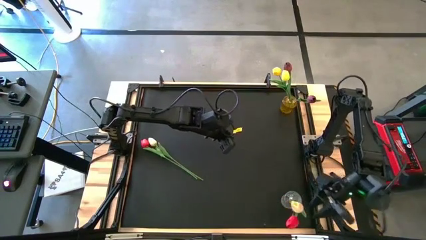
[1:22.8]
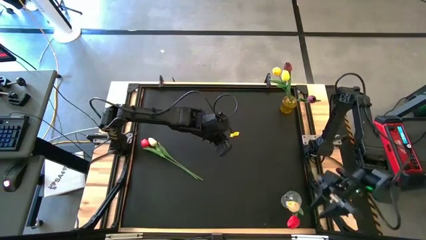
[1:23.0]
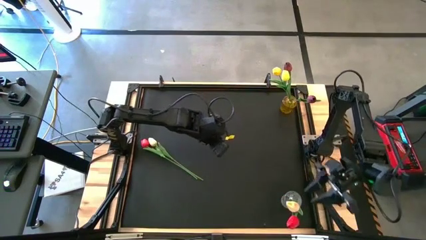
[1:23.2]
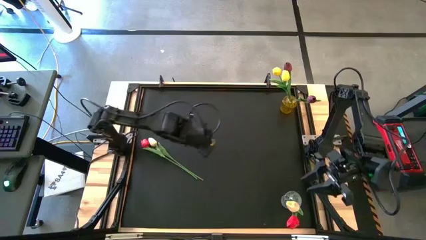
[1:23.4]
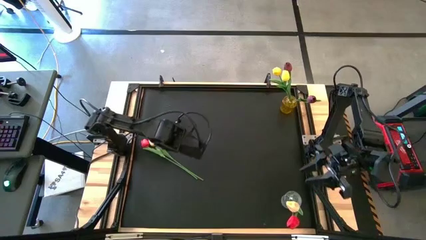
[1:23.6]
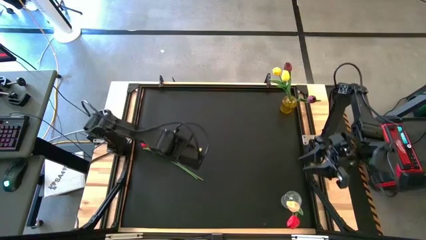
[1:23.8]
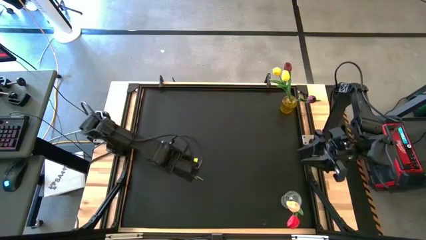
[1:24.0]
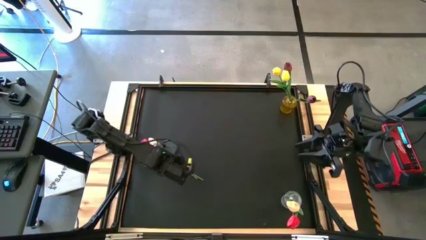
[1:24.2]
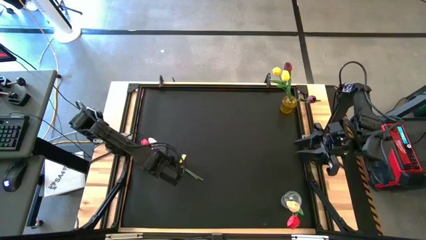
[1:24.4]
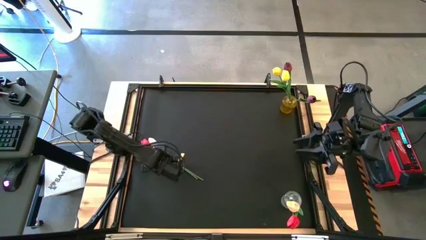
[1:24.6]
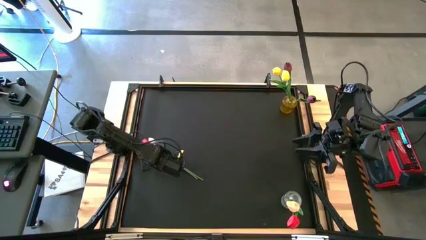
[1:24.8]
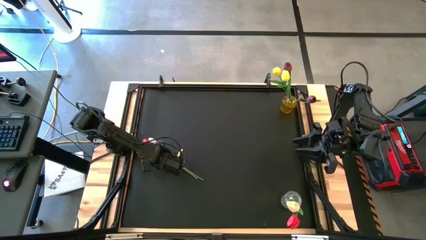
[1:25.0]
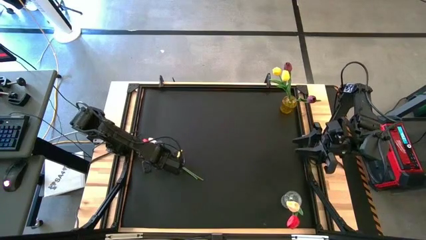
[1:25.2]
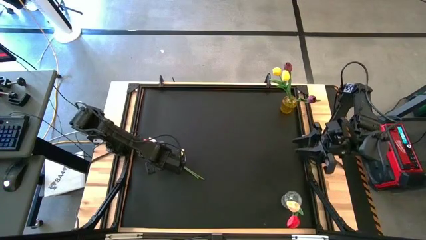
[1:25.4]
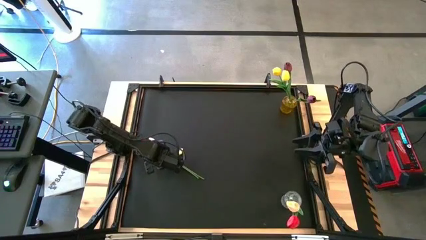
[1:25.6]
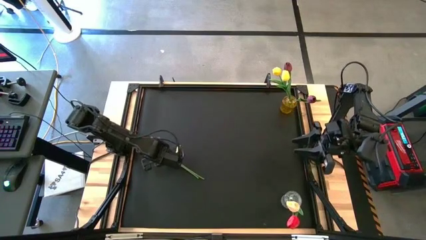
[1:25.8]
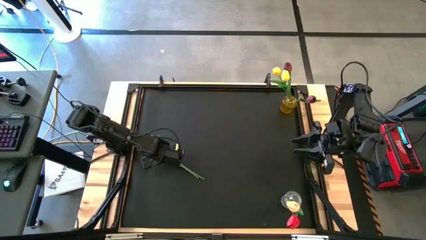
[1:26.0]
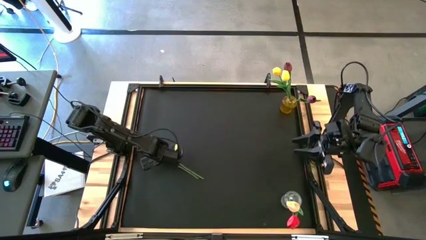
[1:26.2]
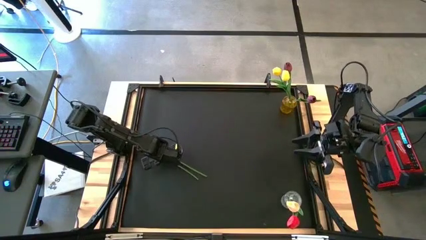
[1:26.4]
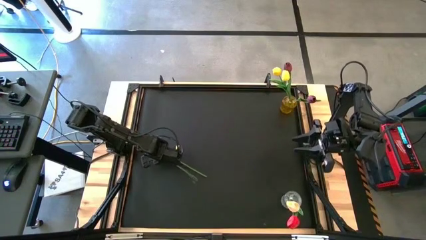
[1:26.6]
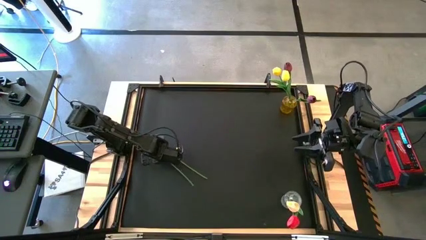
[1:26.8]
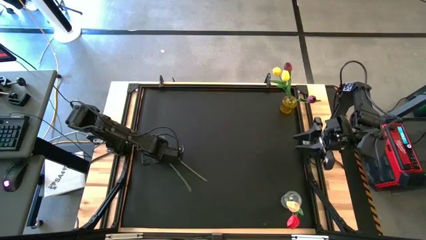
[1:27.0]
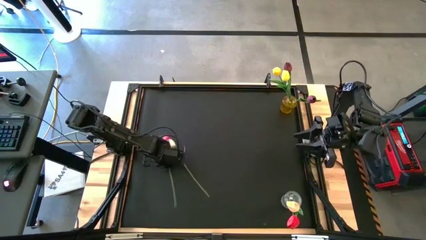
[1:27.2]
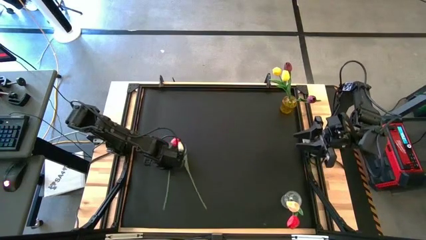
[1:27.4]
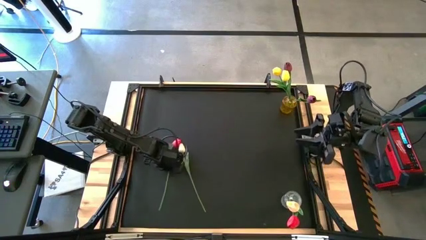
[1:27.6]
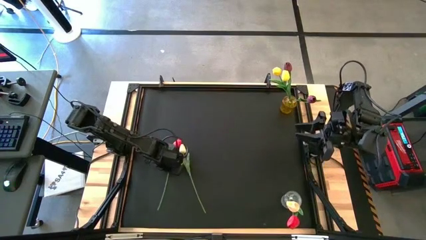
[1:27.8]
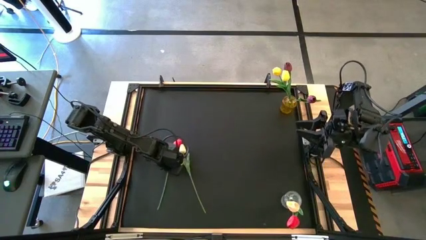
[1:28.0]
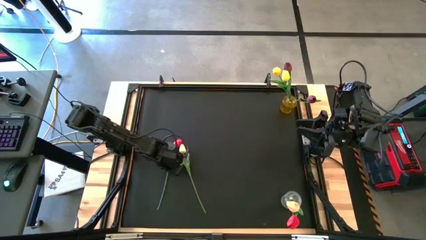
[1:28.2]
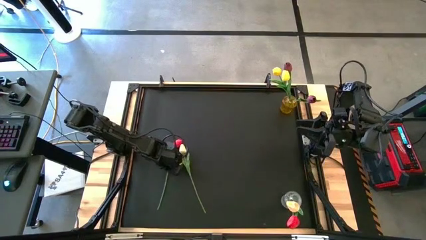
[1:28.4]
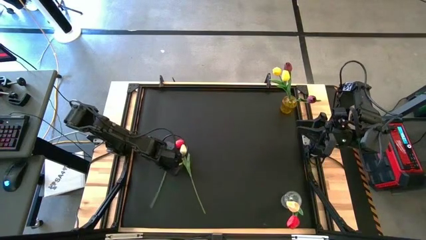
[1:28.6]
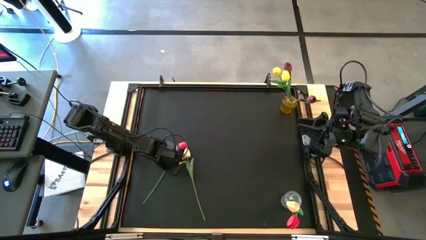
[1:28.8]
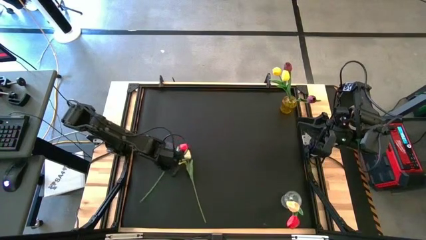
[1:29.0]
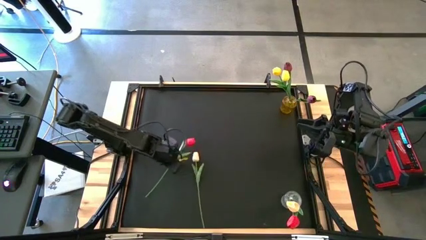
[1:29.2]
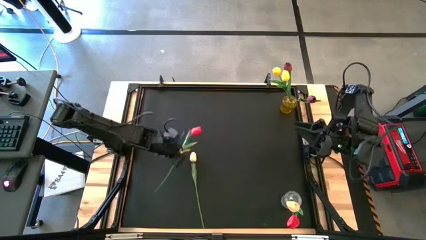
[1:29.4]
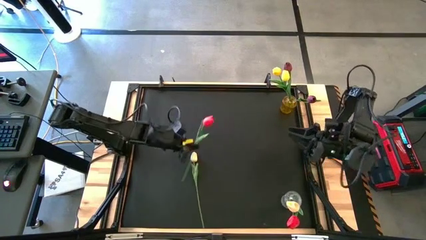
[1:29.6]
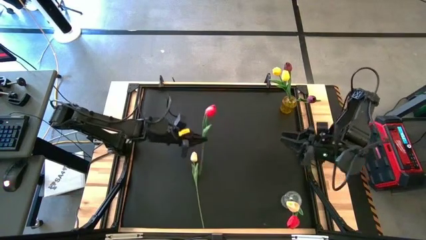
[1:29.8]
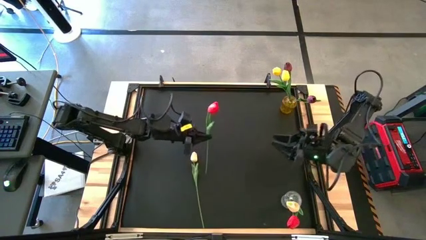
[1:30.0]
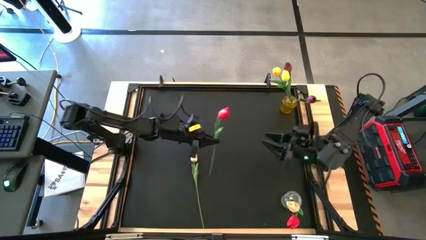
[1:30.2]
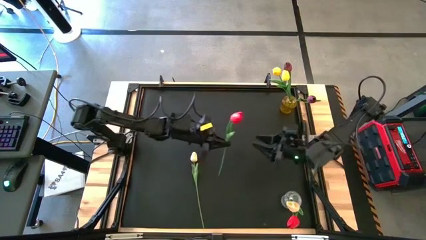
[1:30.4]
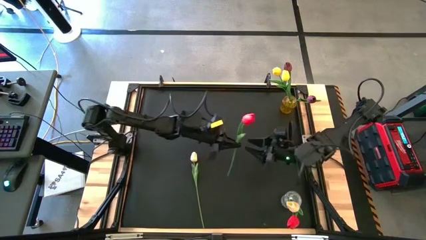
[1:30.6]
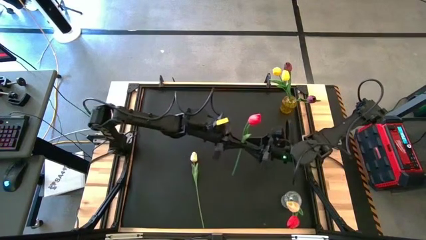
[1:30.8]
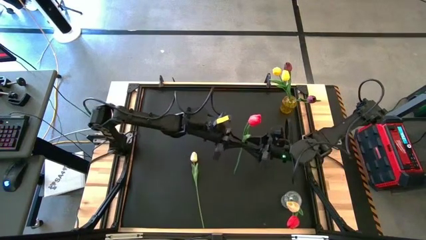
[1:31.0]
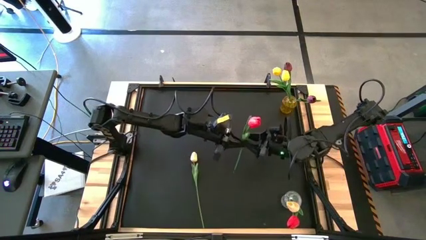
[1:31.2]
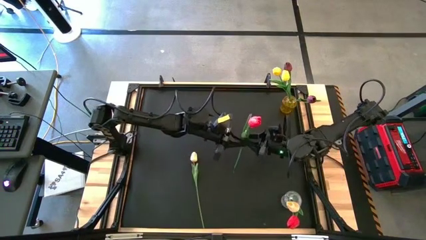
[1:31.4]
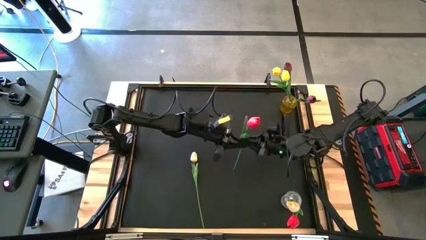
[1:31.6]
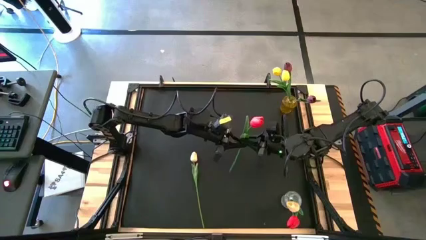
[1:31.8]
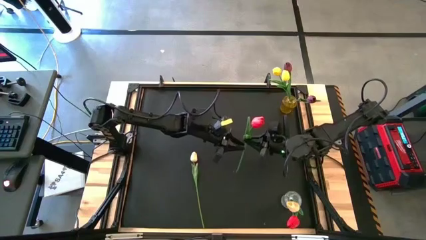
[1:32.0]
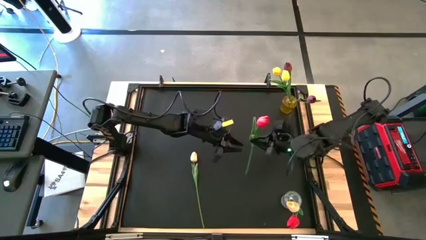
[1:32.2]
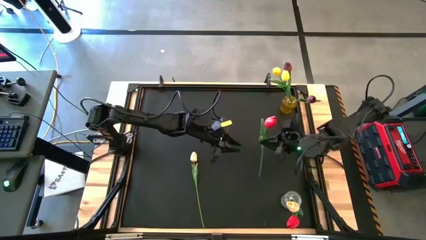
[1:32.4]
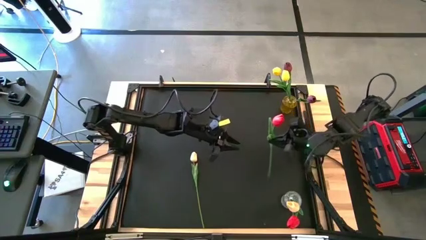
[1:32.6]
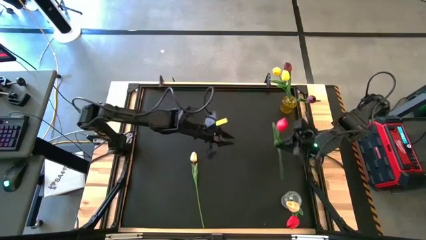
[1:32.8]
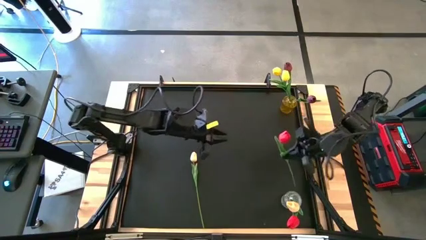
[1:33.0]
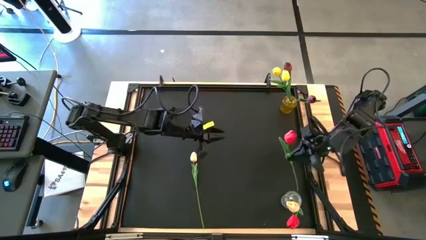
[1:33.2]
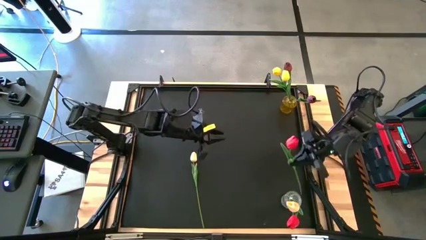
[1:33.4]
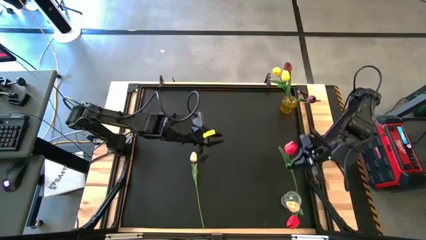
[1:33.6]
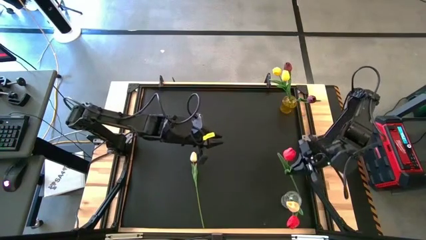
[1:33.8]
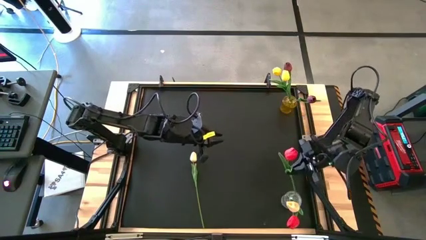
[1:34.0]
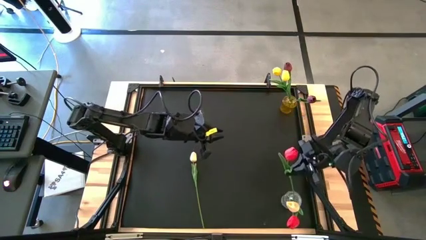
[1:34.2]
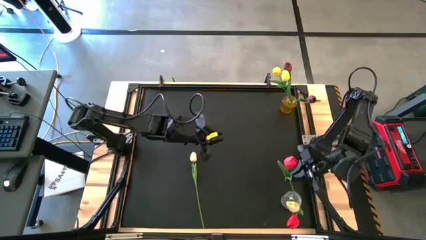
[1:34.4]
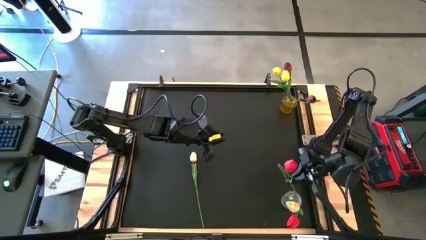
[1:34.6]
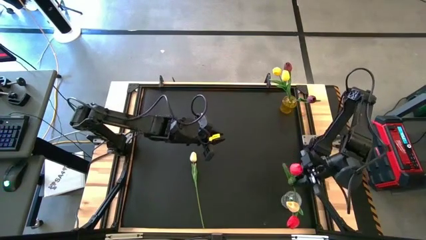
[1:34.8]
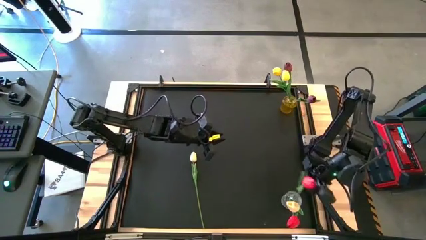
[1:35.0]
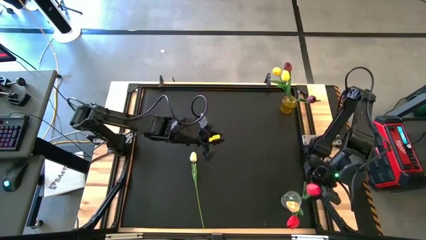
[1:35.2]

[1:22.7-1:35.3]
Task: Sort flowers into vase by color
Put the red flower into the transparent vase

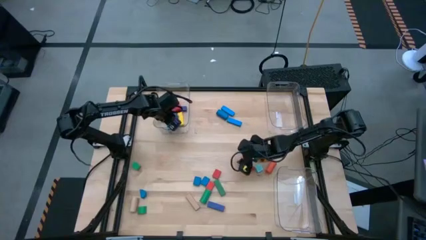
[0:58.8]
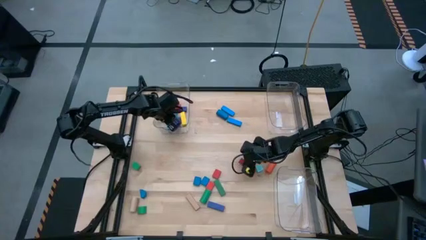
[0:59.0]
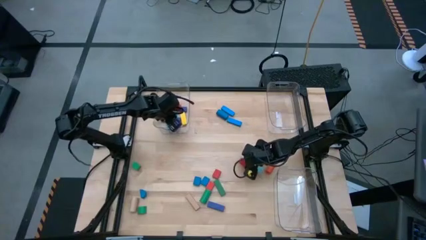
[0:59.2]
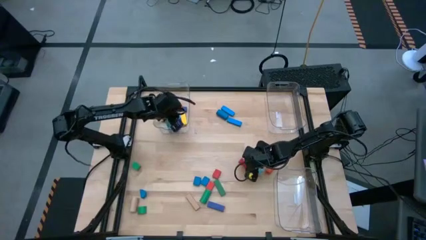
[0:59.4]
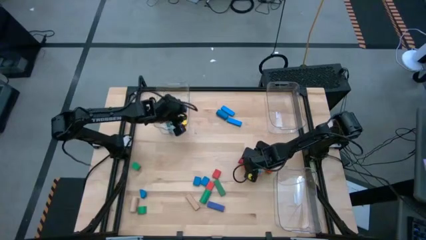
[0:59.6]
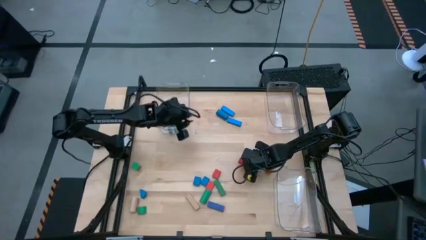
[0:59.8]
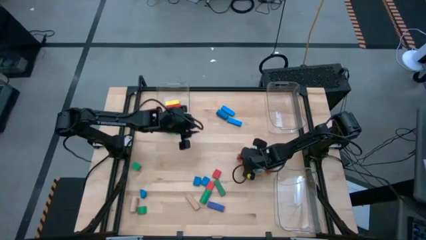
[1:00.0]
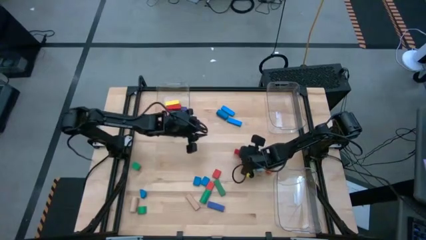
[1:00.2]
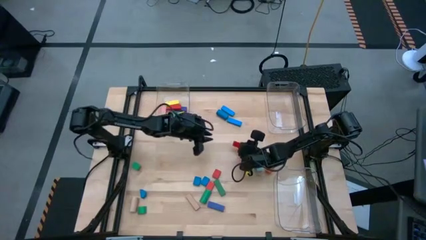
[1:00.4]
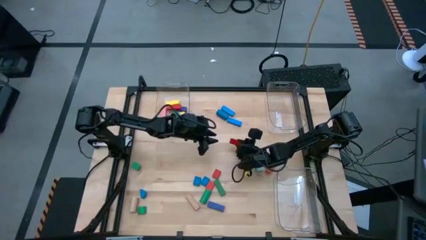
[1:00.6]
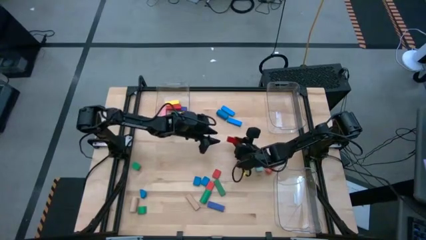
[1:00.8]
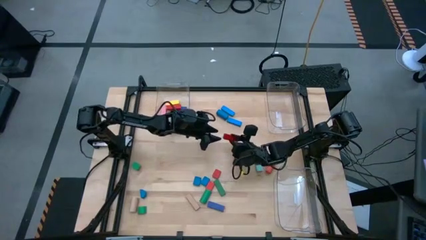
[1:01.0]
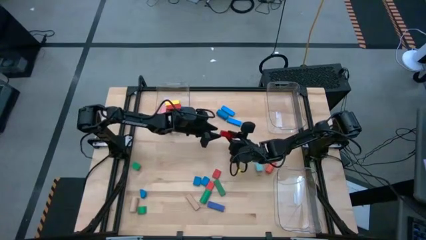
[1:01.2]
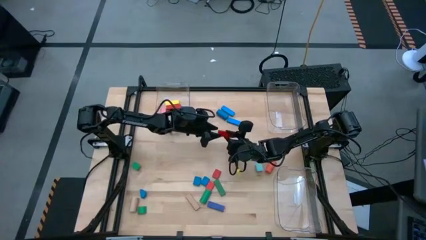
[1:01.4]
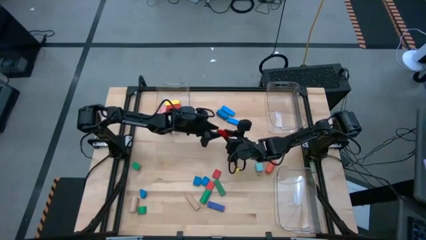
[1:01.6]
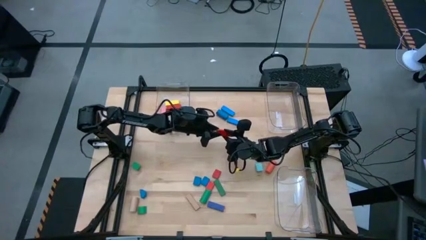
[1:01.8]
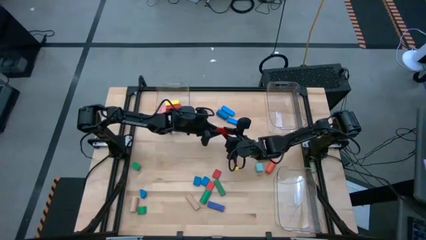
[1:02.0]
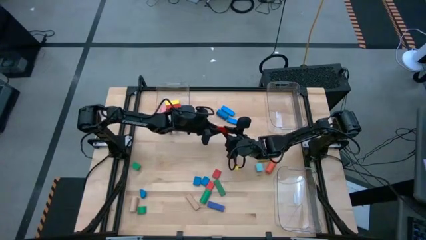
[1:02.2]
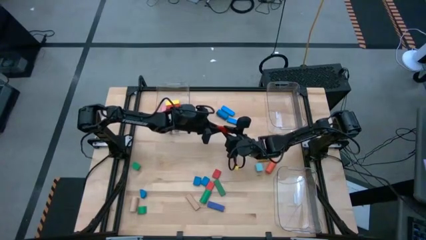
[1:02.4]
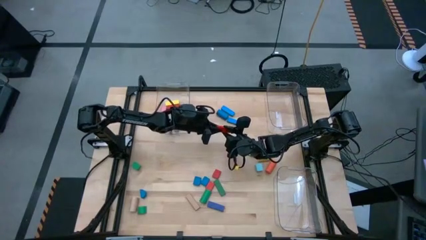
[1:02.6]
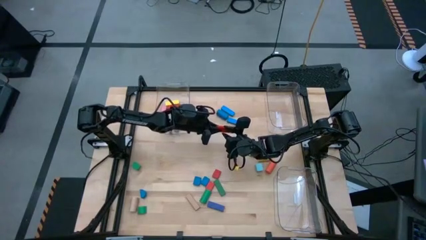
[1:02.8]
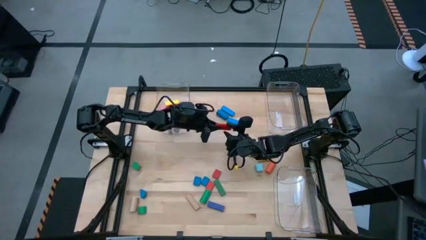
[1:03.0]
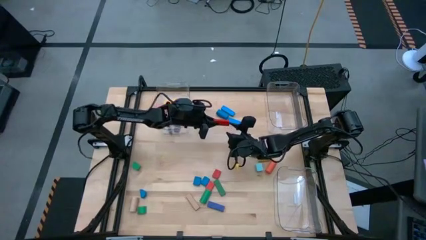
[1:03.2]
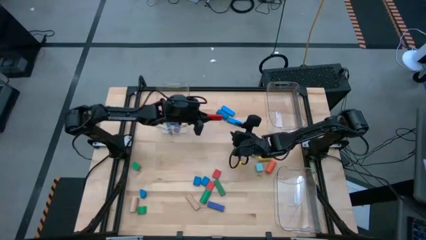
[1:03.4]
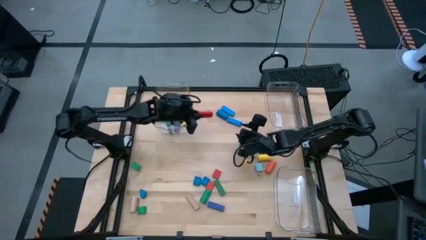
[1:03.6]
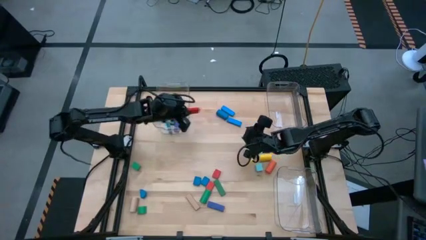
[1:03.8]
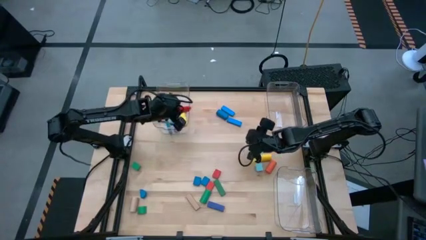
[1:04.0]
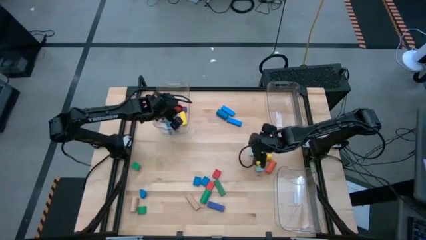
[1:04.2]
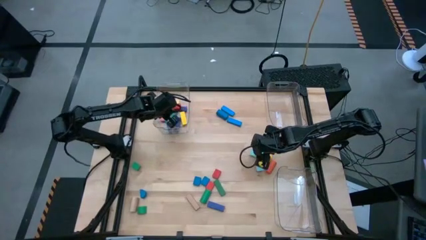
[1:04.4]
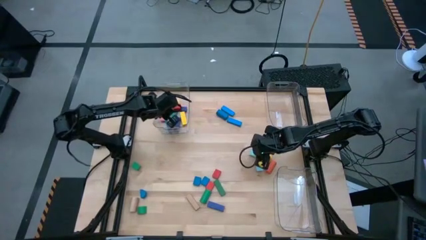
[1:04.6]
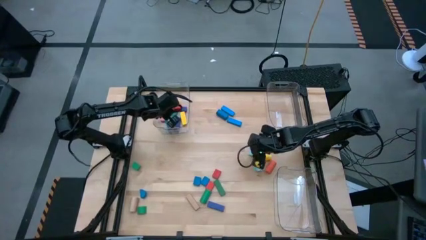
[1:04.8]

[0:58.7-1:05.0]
Task: Sort blocks by size
Put the red rectangle block into the top left transparent bin
